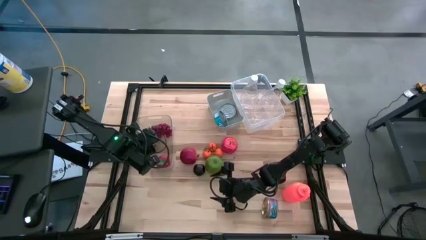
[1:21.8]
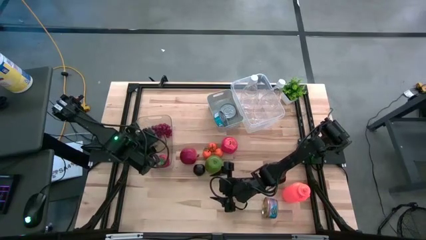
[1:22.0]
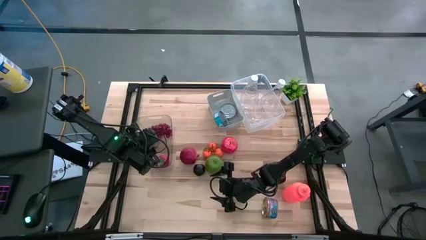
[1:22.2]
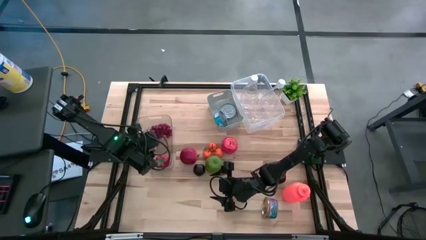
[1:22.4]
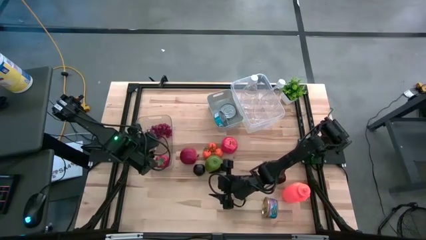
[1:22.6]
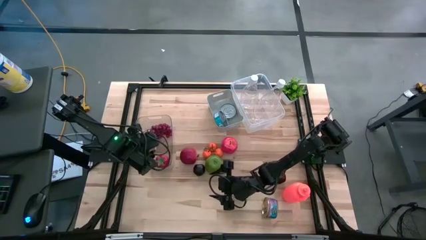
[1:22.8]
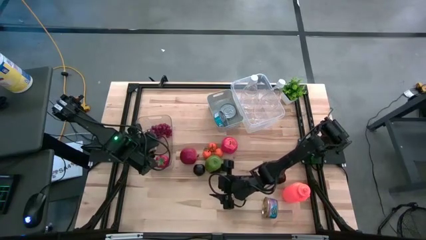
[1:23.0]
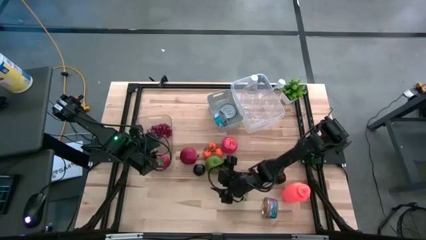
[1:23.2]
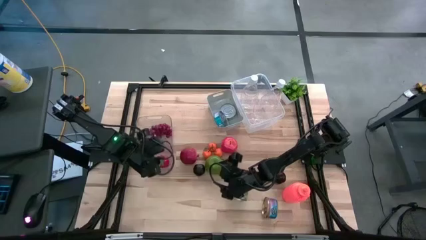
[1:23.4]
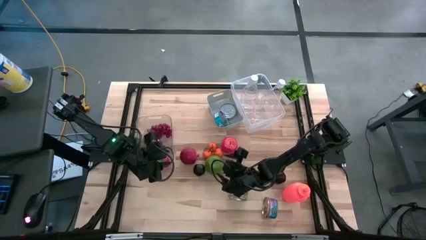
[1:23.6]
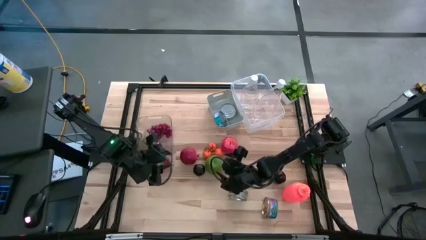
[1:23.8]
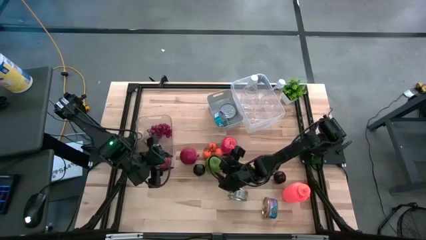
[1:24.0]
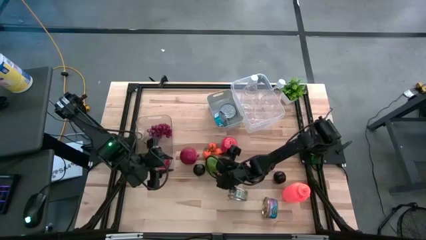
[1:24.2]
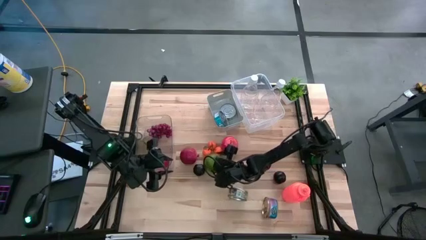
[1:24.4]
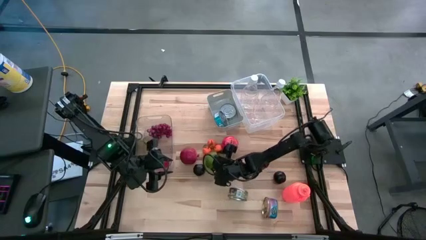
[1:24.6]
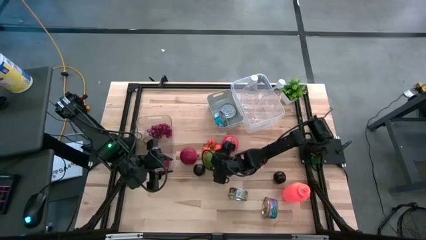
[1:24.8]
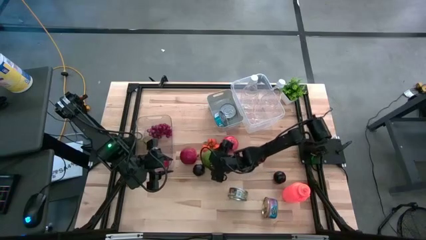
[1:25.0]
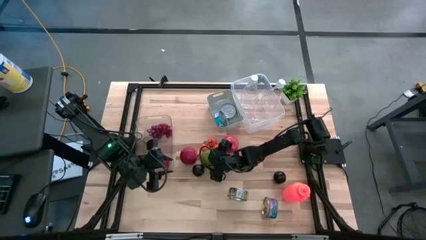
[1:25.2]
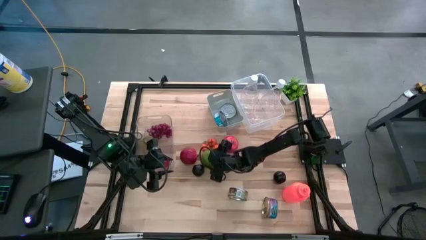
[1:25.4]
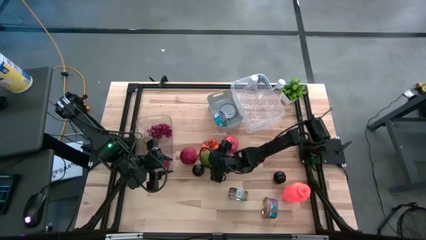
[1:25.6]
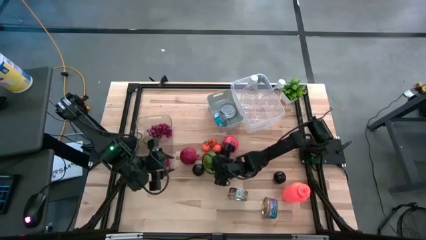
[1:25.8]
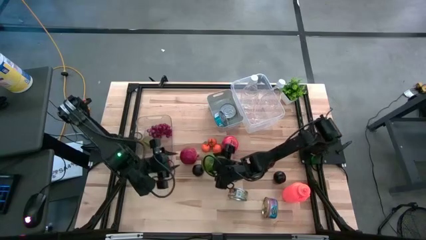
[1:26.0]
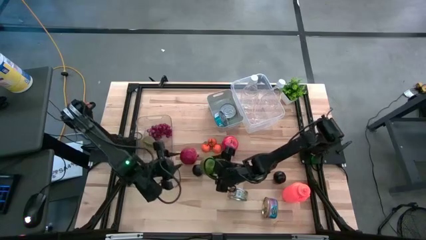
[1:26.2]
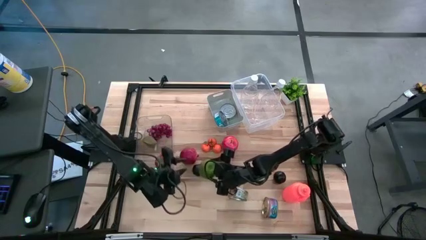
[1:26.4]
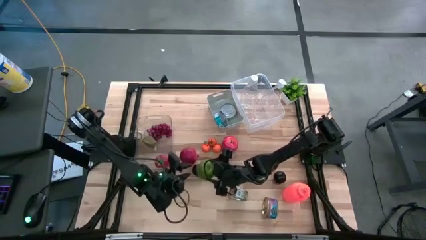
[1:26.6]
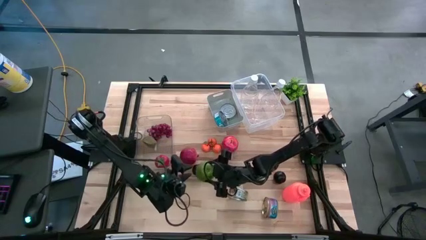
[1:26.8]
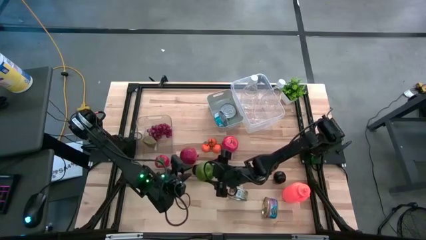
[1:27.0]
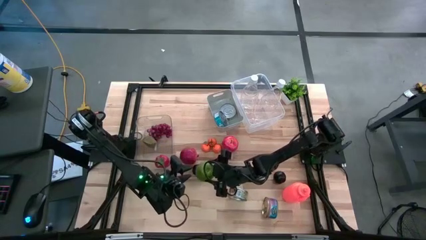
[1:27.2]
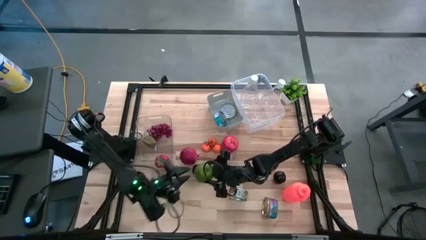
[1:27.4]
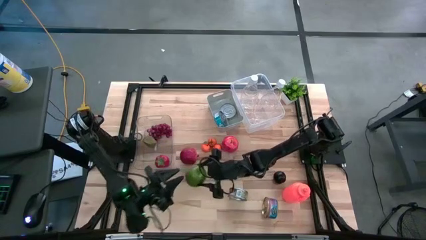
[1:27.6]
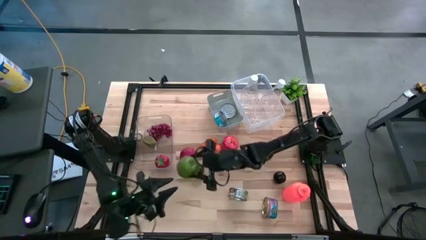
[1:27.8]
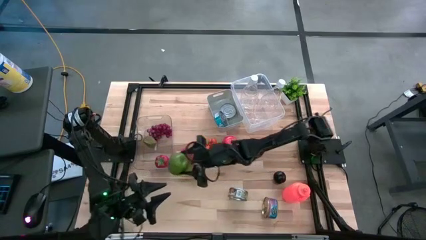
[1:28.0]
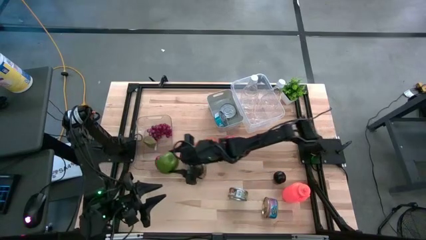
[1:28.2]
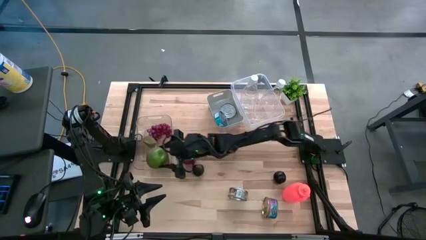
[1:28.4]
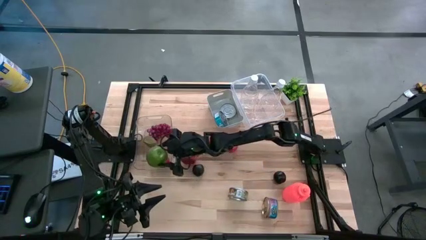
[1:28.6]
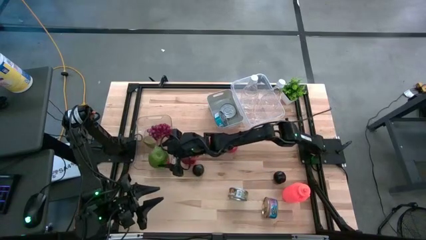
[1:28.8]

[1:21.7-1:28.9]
Task: Pick & Place Food Item
Put the green apple into the left transparent bin

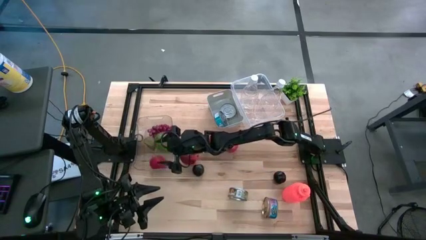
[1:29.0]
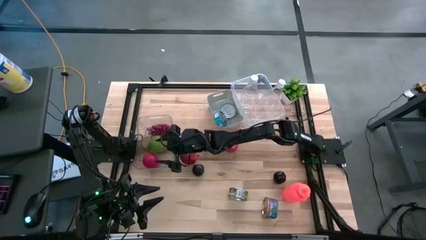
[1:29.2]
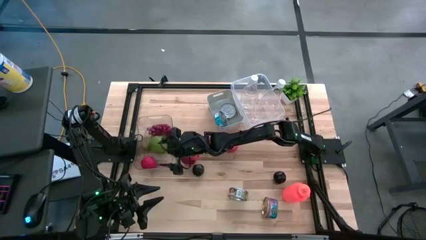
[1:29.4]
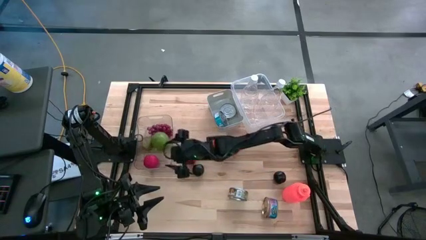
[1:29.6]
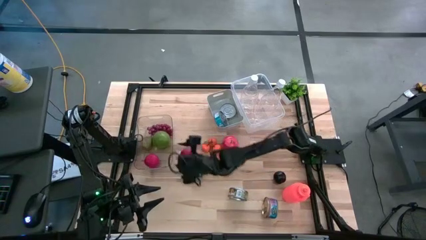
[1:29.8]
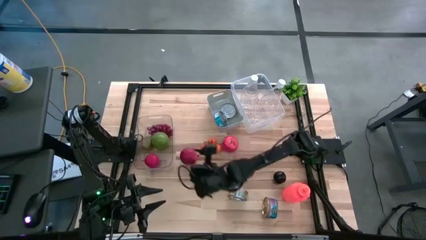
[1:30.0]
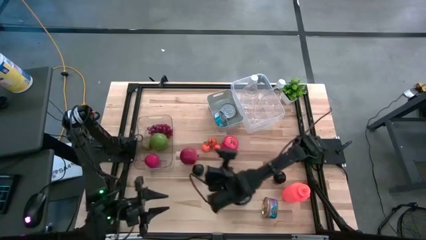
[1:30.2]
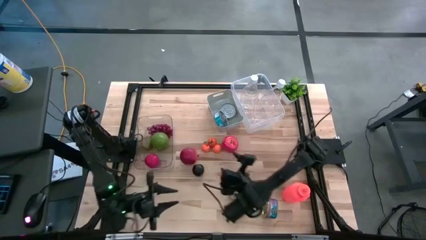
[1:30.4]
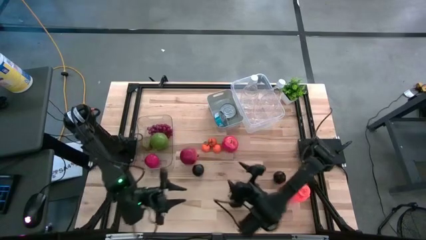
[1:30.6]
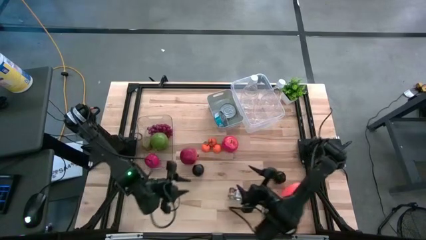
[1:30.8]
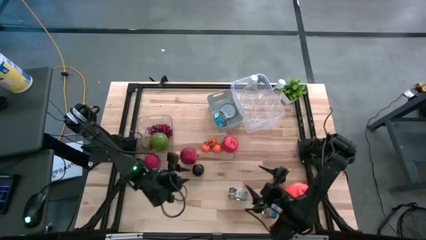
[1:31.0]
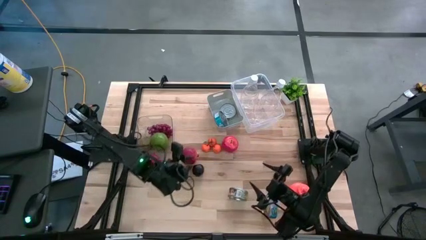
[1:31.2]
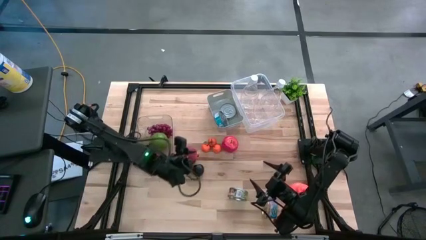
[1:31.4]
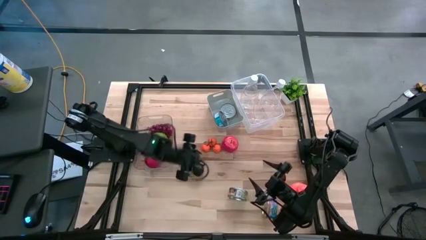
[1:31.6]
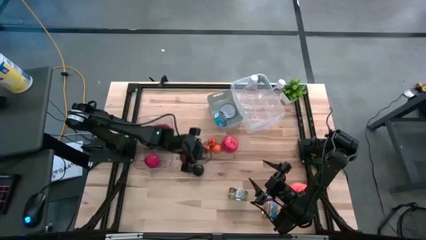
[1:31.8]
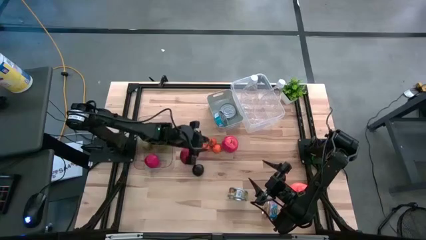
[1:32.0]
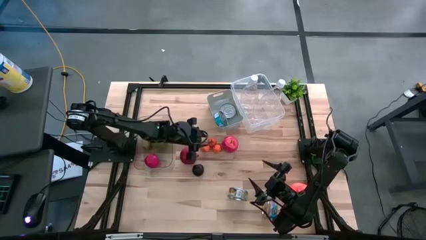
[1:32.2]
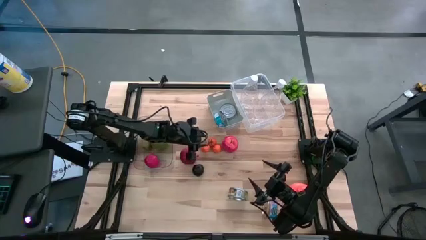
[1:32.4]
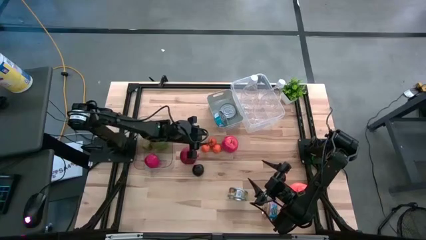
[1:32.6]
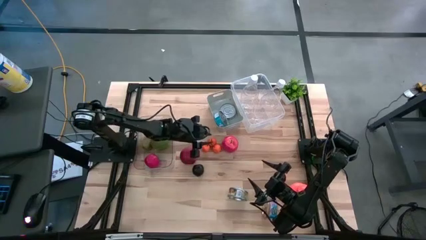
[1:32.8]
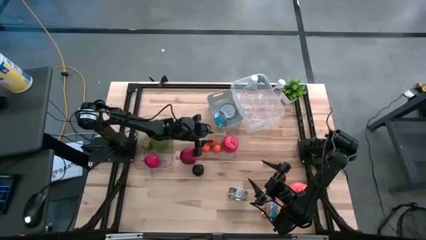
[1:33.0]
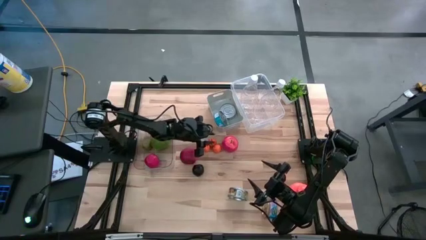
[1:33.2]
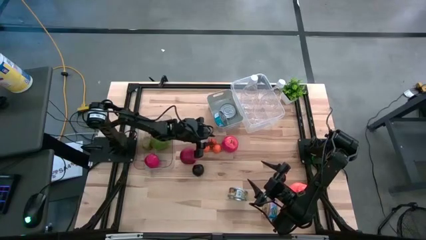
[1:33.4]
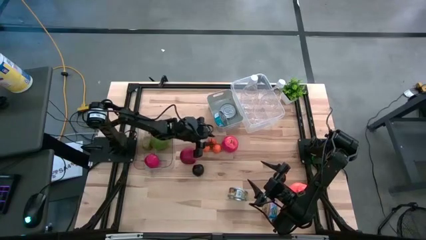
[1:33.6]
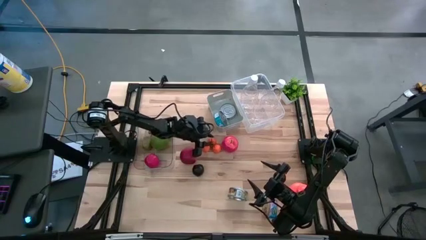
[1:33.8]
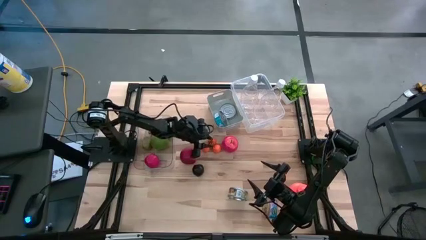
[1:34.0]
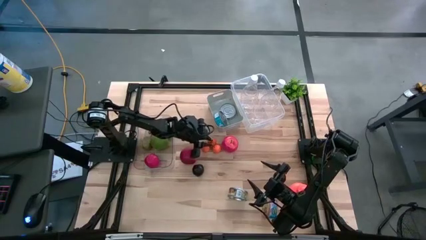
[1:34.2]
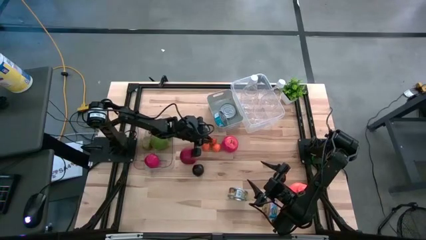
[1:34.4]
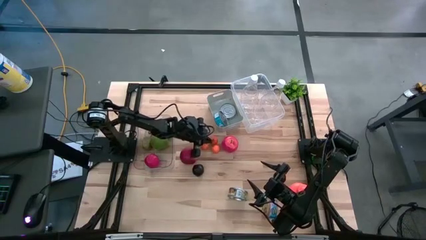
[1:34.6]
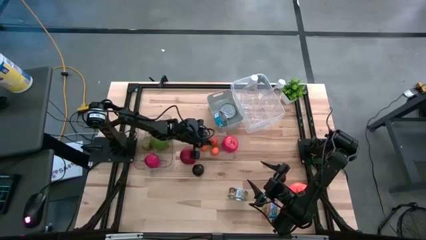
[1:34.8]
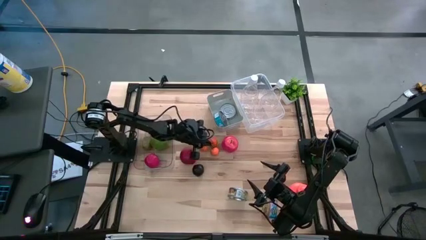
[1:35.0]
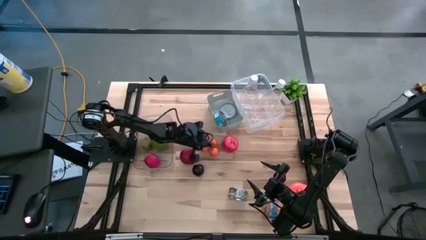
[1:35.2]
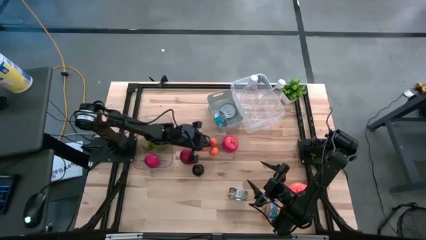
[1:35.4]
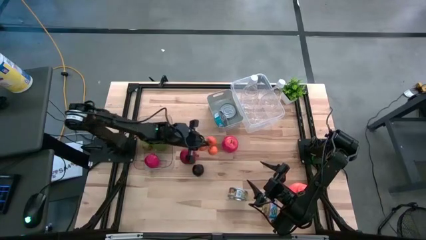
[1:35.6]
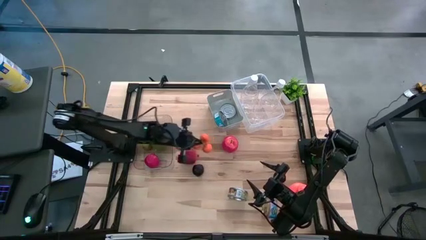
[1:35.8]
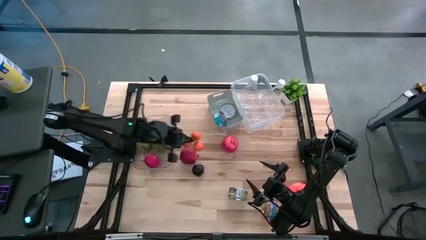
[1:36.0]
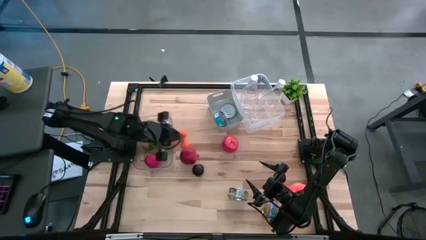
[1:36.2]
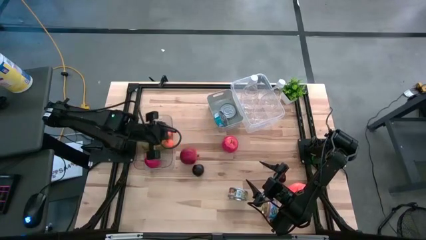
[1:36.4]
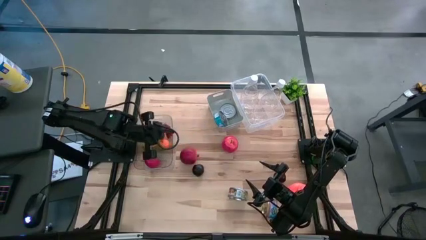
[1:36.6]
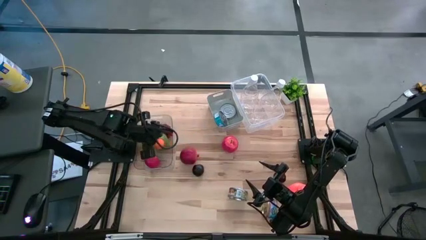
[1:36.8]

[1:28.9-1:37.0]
Put the orange tangerine into the left transparent bin

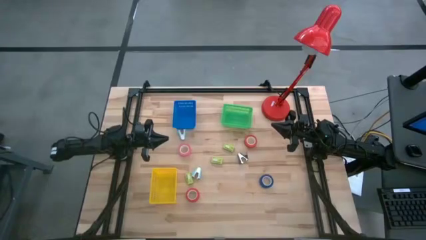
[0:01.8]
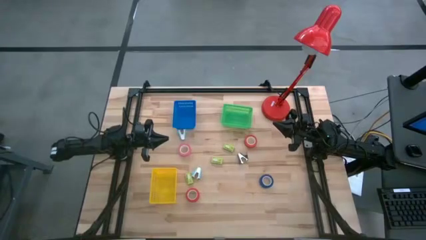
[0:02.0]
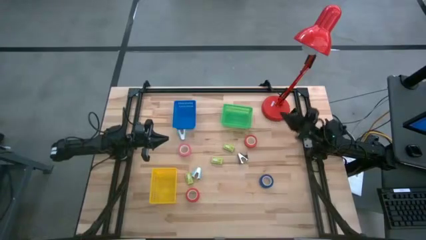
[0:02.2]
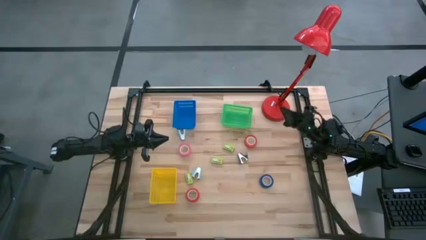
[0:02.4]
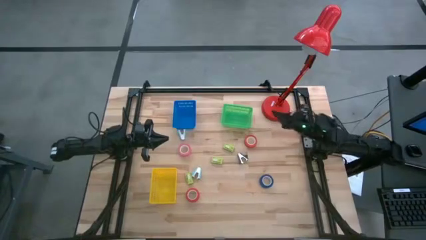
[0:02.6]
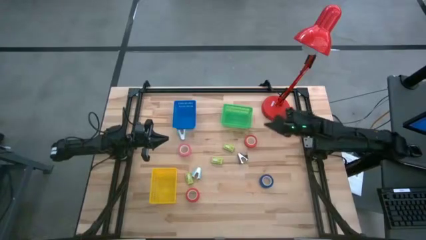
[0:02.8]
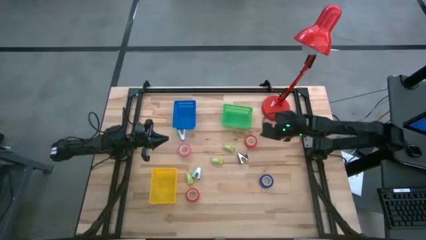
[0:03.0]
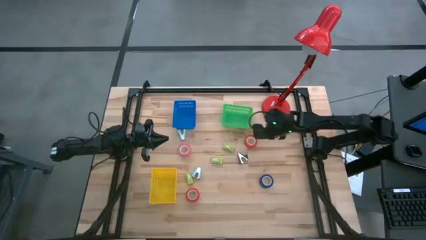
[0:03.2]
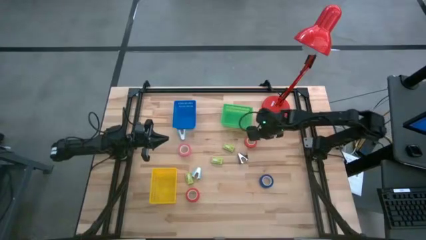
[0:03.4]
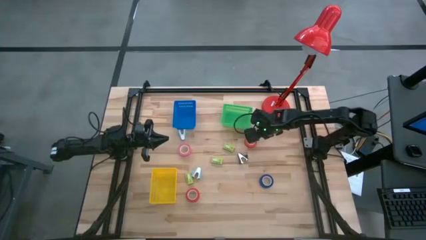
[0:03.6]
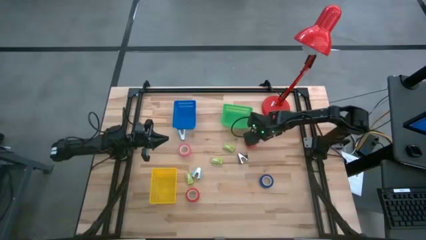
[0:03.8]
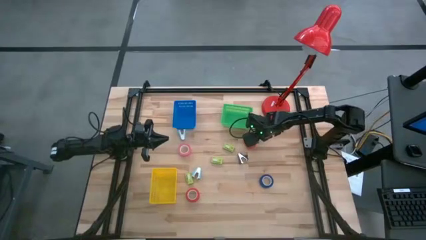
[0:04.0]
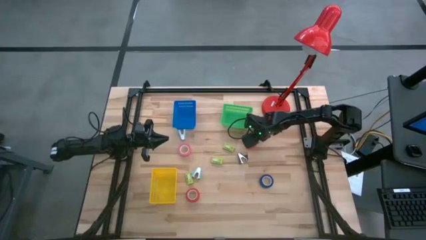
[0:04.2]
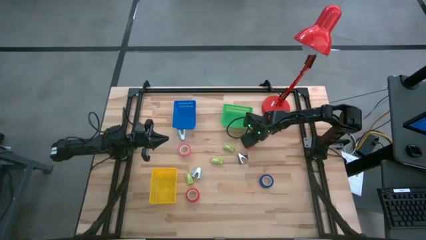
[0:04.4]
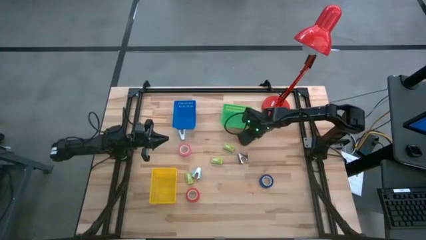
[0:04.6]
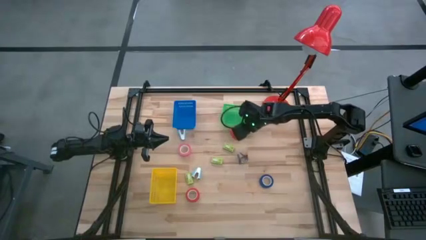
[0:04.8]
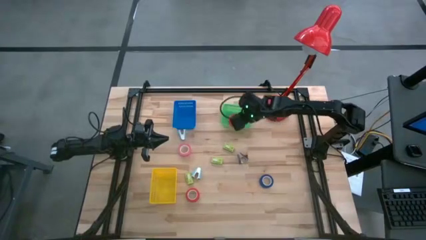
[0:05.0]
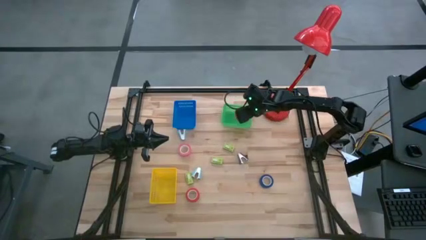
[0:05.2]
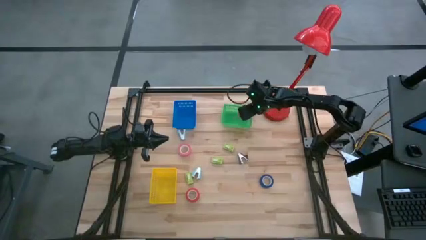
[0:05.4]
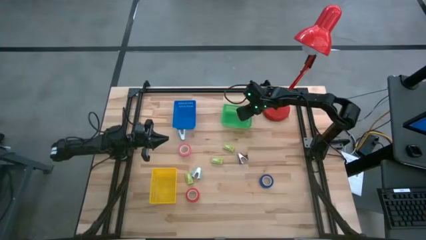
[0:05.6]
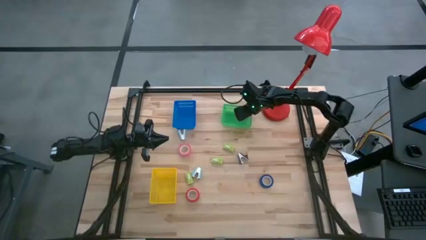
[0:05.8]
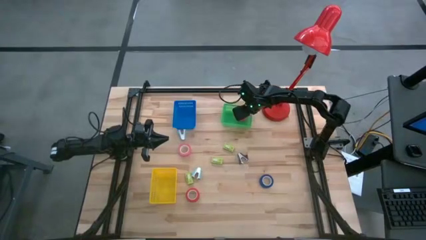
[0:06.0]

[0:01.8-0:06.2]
Task: Pick and place Stapler, Stapler remover, tape
Put the red tape into the green basket
